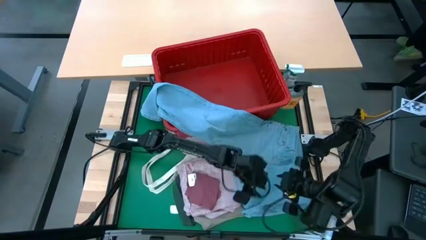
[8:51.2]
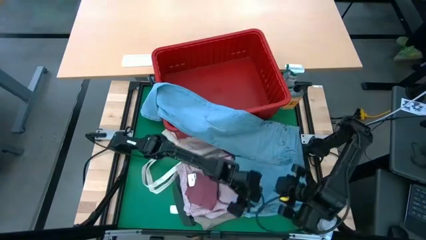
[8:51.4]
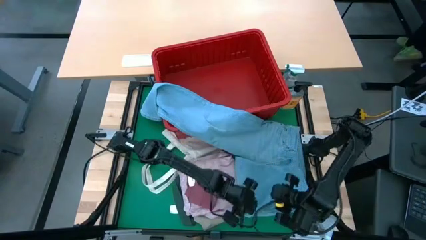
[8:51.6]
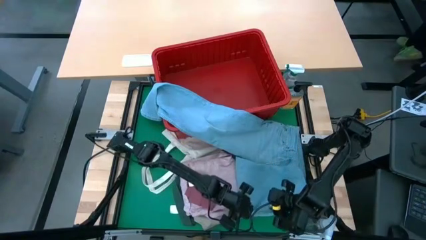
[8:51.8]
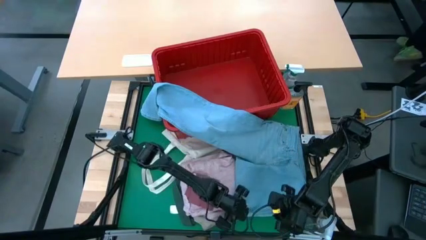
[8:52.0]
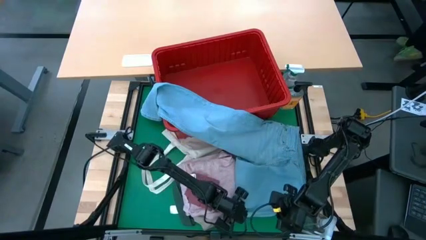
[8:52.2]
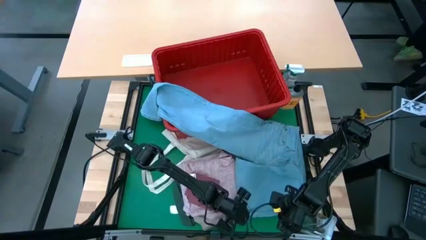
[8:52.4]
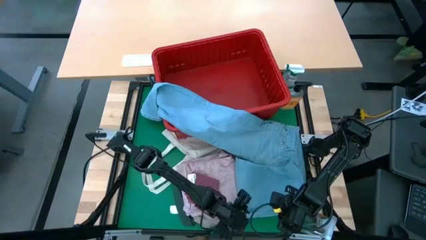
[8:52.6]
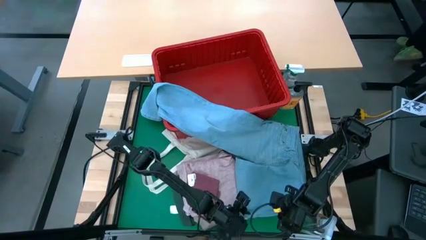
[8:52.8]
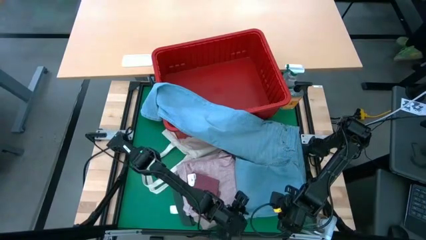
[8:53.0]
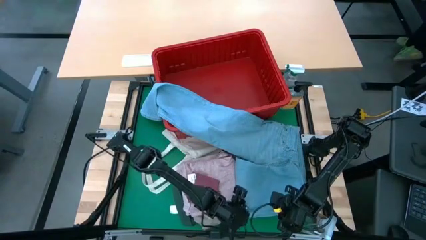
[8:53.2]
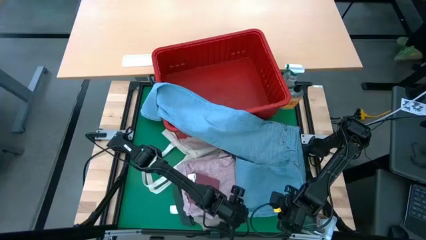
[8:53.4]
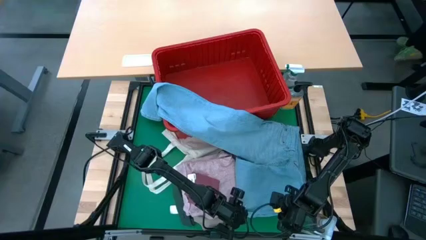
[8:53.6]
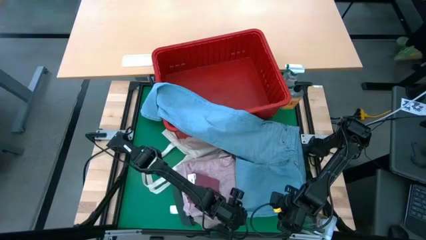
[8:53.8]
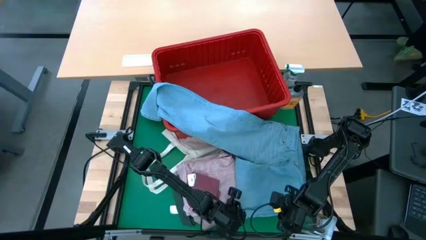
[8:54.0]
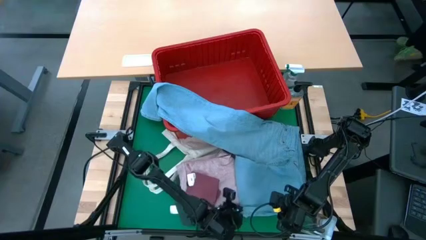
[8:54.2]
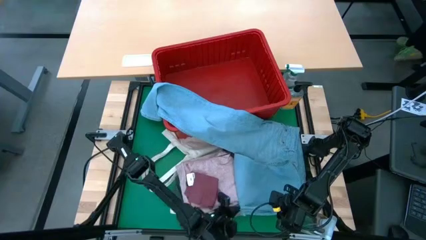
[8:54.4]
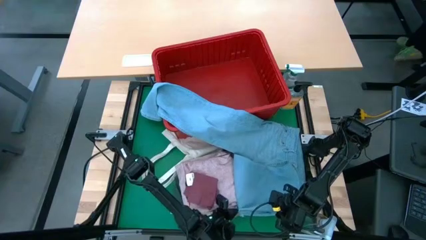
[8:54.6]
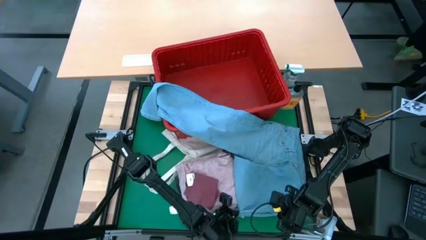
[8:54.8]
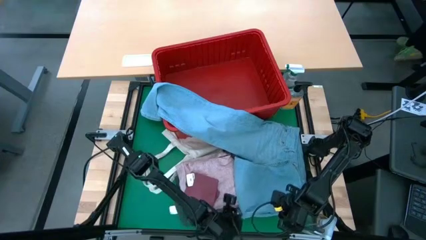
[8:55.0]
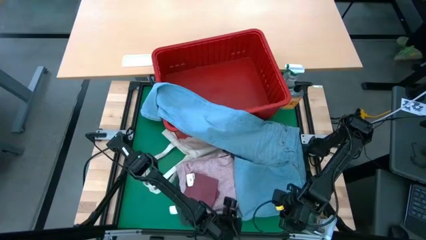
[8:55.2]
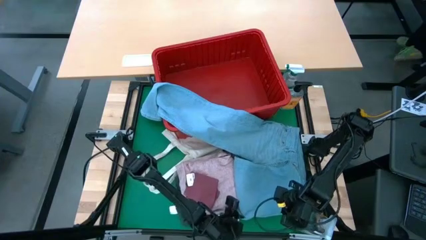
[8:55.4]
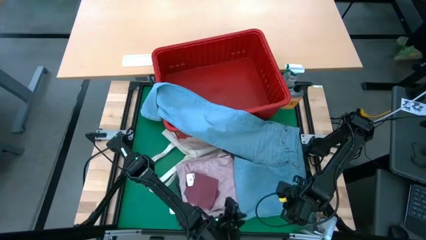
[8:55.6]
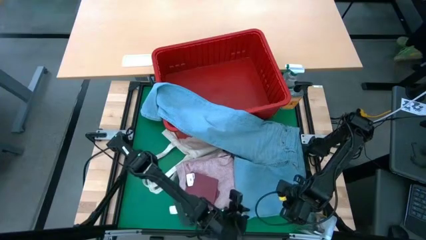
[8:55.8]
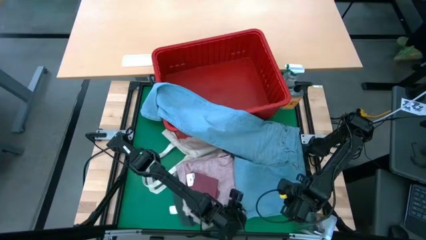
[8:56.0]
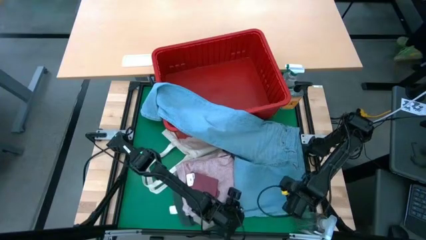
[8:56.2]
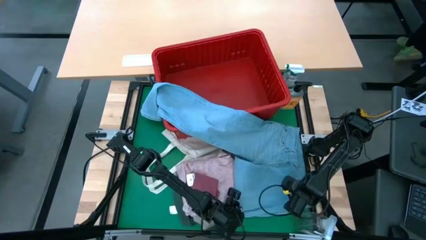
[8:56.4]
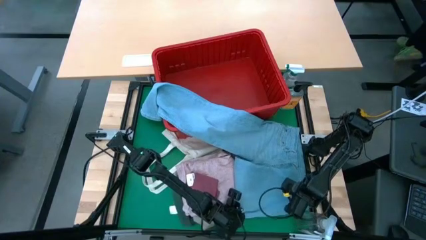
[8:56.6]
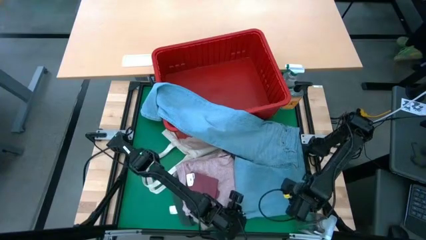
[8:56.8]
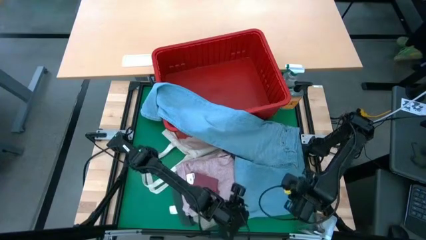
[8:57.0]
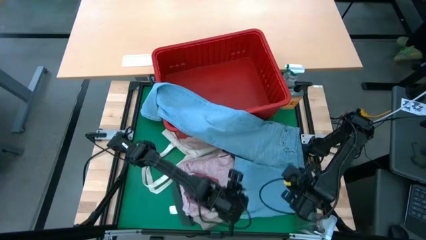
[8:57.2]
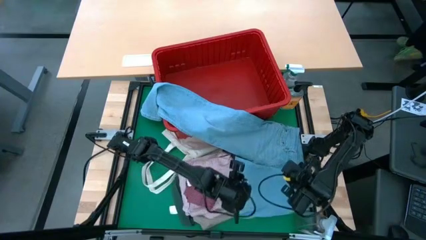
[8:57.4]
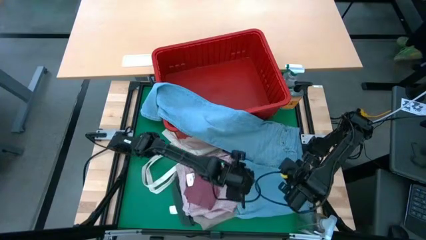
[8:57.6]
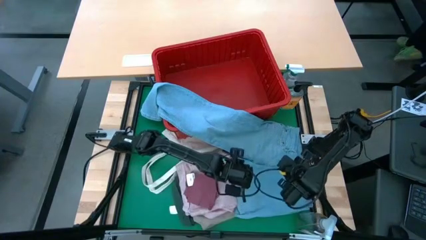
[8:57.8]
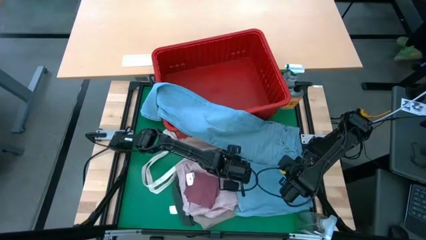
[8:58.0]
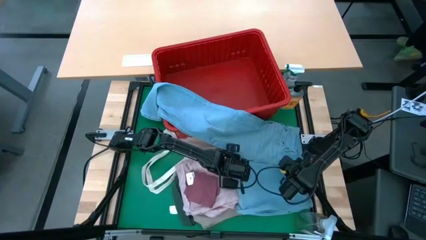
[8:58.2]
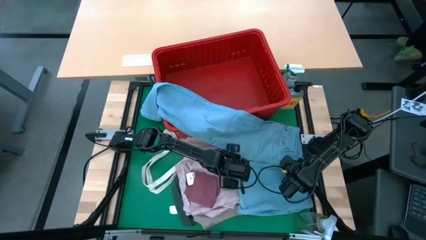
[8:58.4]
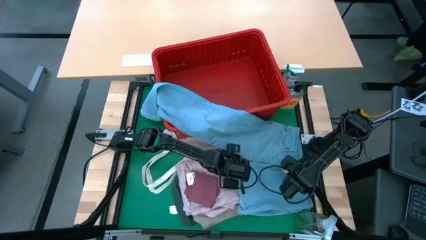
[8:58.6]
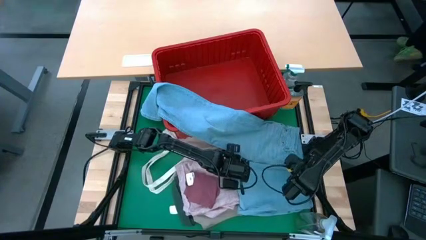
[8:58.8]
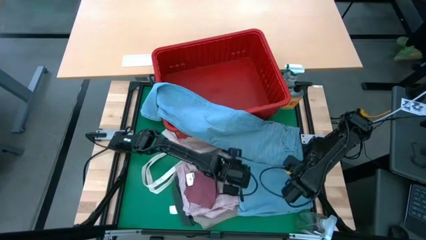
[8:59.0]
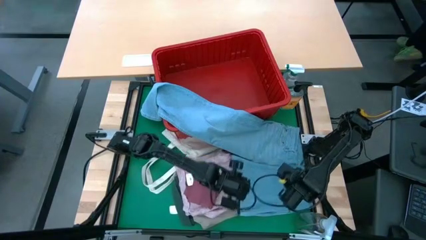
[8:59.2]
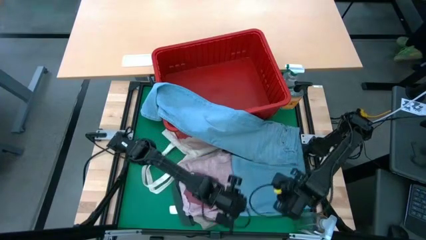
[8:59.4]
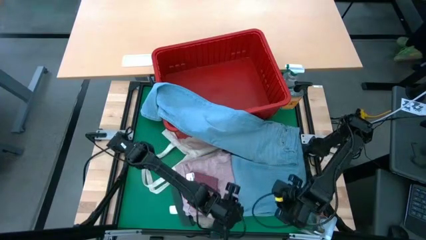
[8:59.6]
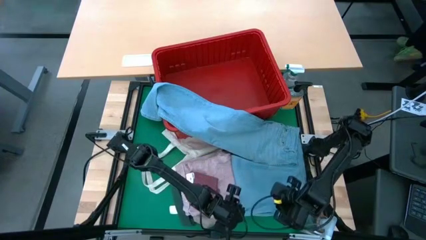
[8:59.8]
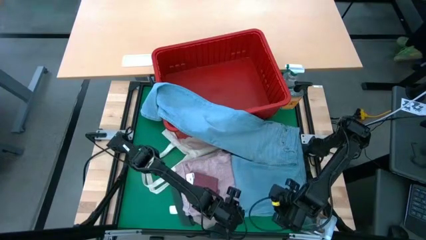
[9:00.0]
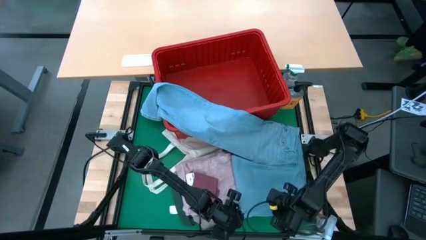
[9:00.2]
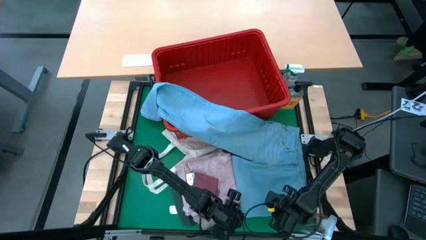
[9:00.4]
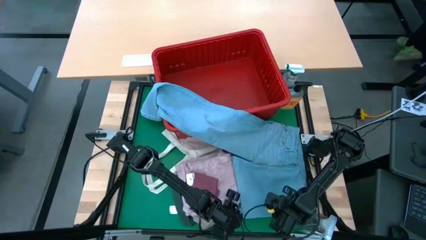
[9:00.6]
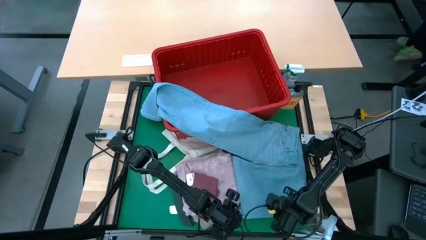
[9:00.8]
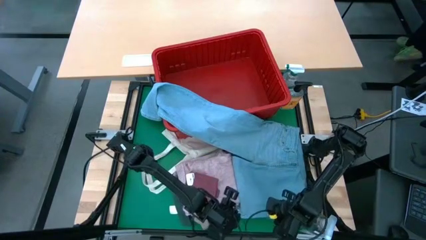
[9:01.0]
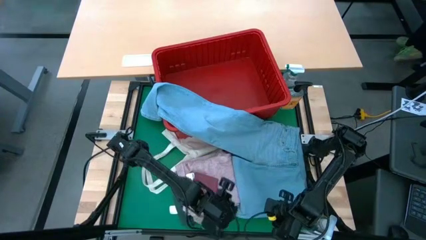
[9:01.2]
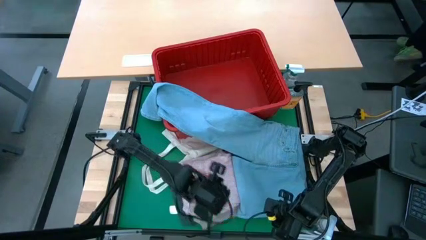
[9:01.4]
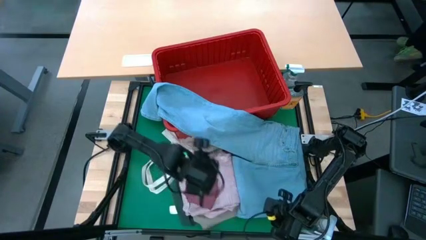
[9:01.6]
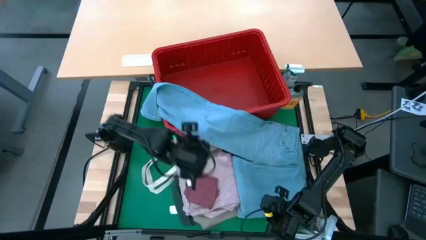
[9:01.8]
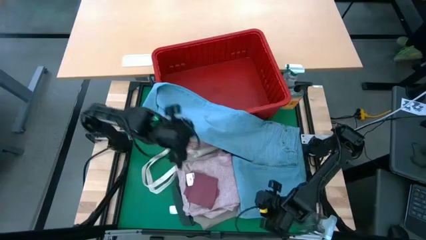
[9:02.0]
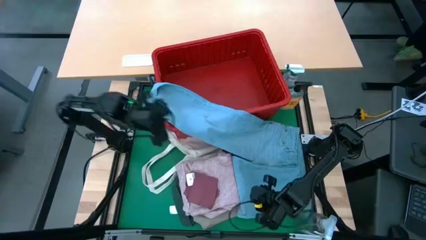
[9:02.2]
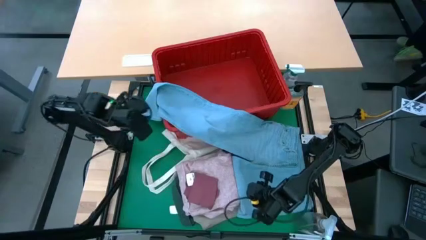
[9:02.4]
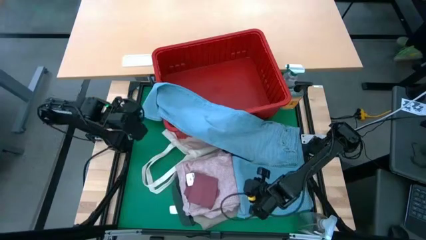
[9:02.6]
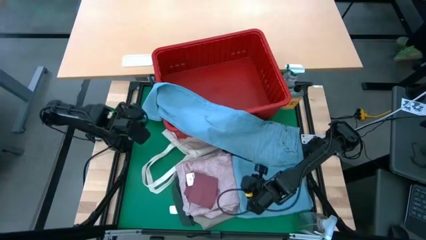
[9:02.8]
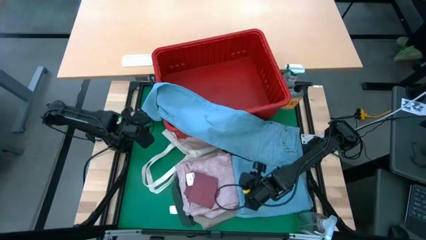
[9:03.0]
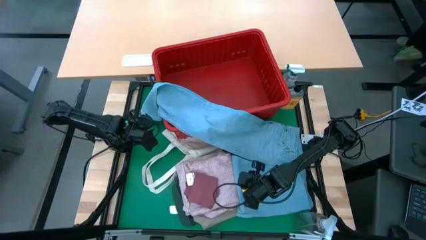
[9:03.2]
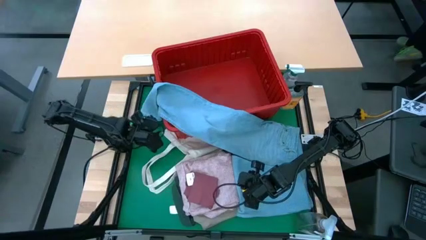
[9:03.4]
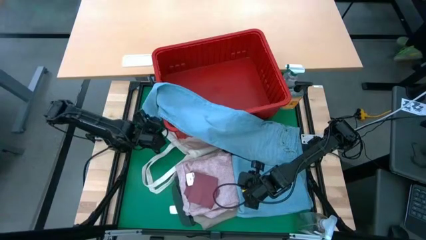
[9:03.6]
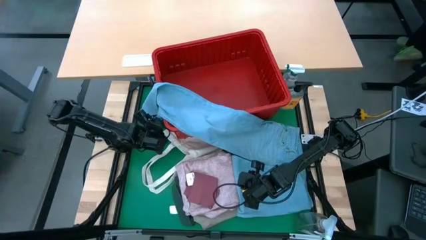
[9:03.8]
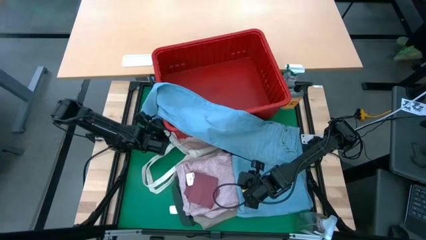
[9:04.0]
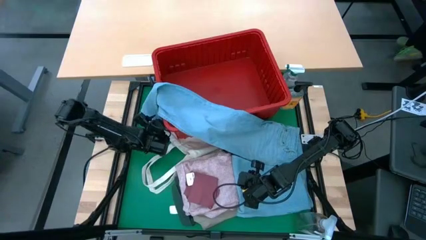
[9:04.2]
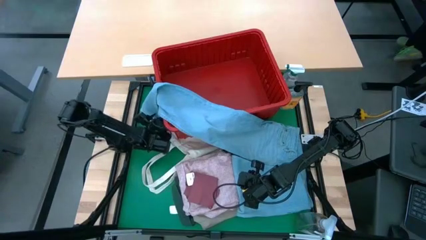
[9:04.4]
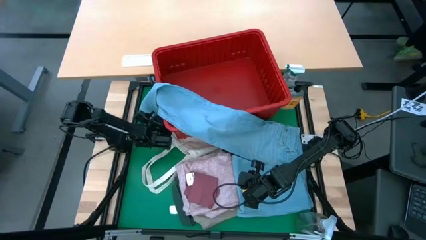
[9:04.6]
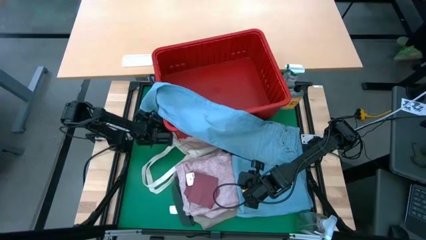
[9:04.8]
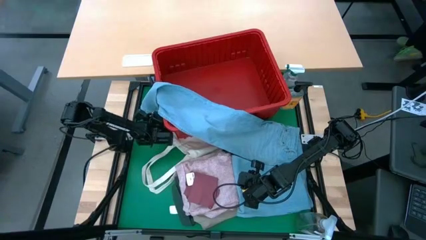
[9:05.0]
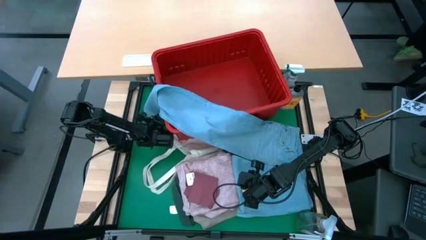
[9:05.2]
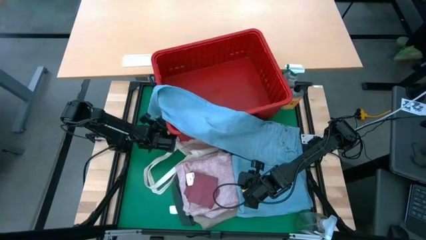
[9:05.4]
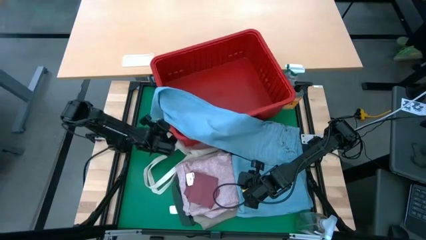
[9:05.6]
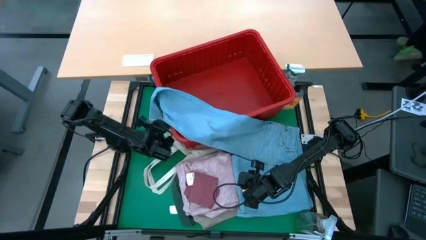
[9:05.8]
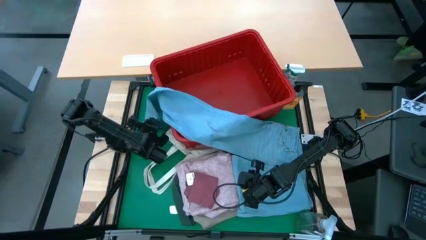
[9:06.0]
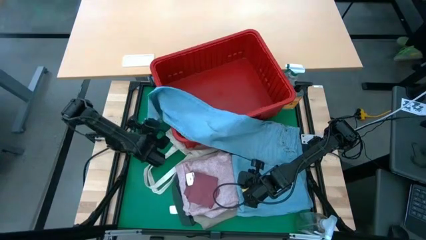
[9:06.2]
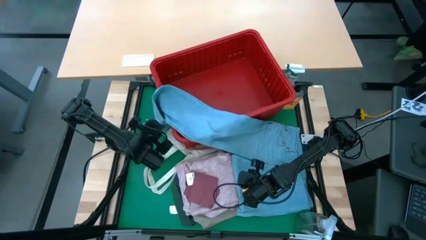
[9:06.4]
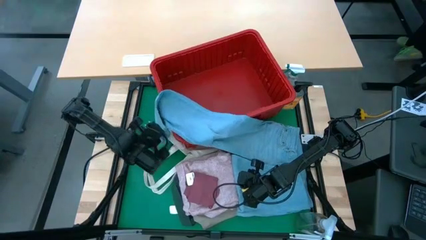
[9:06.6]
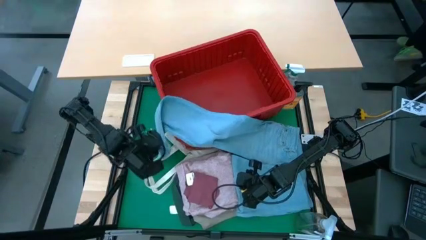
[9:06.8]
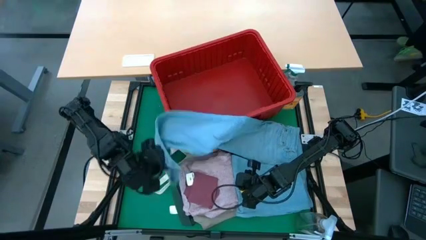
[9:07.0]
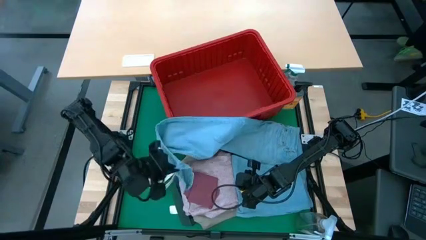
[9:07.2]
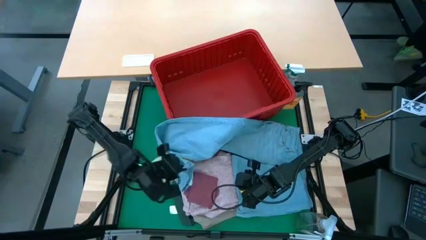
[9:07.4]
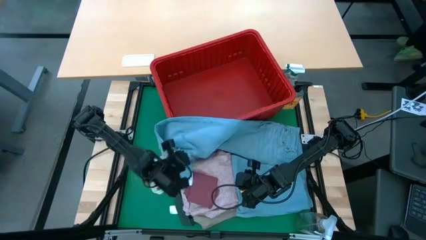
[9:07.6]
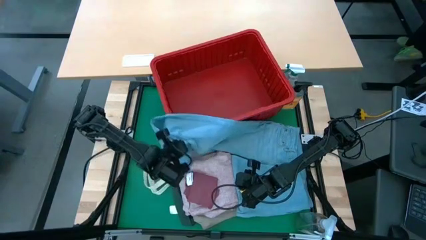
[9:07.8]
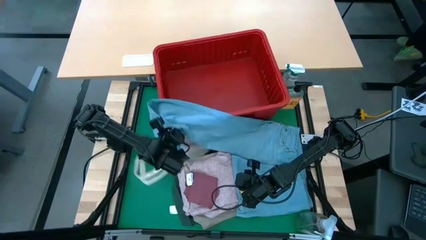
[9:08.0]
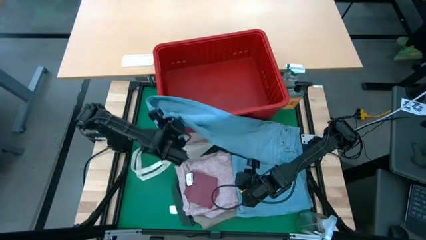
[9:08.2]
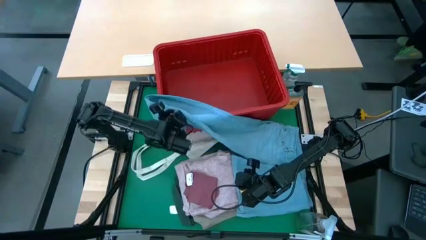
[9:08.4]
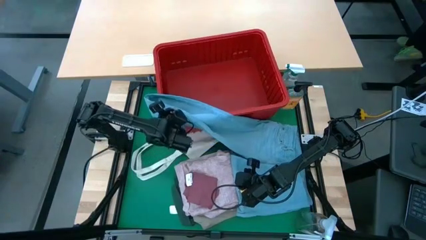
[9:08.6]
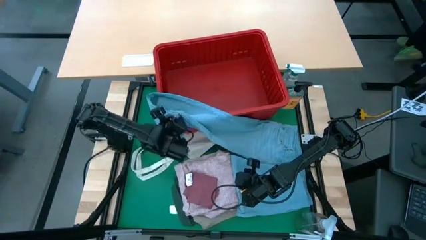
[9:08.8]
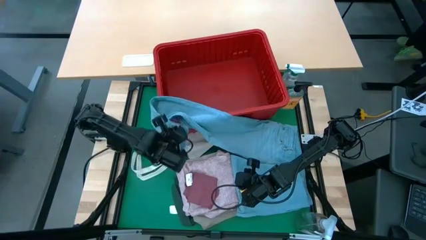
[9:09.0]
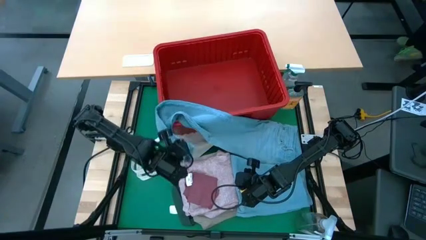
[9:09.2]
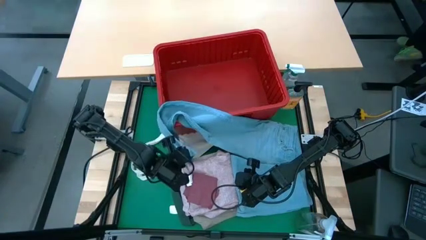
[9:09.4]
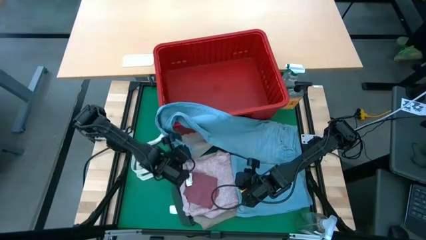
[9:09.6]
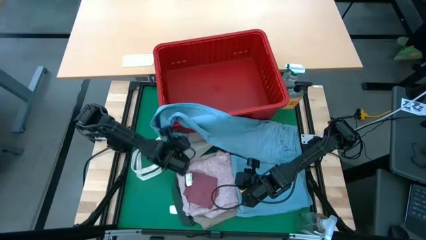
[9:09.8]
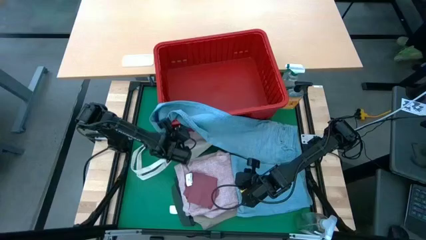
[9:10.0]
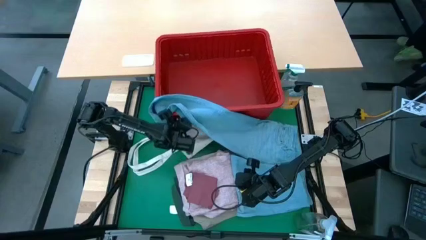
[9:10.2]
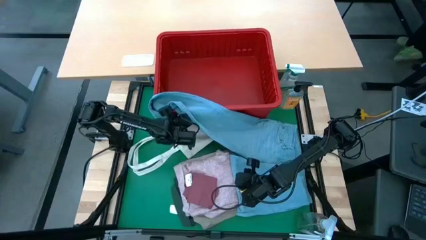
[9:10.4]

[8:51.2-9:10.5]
Task: Fold laundry
Fold the blue jeans
